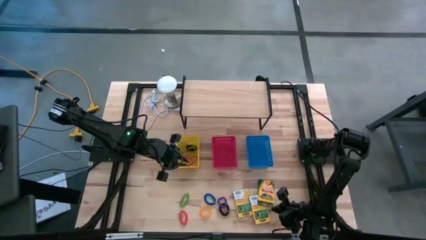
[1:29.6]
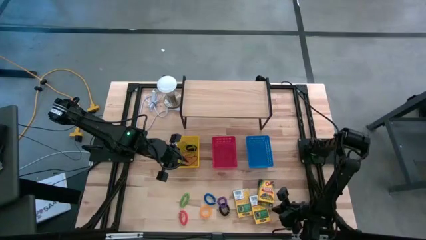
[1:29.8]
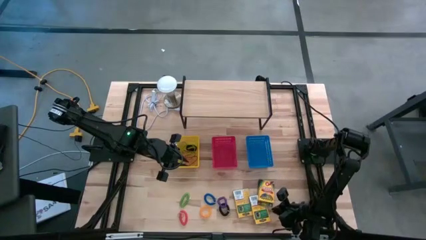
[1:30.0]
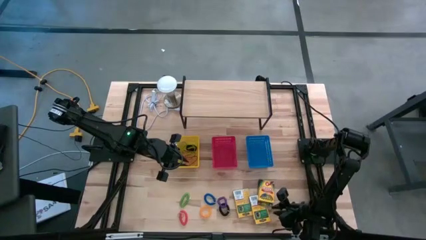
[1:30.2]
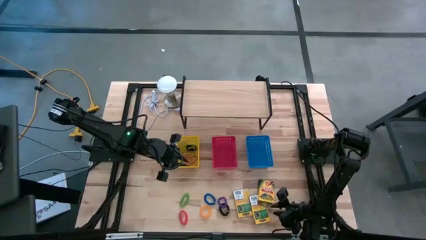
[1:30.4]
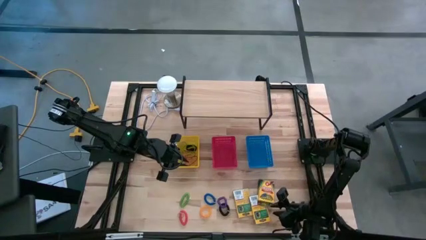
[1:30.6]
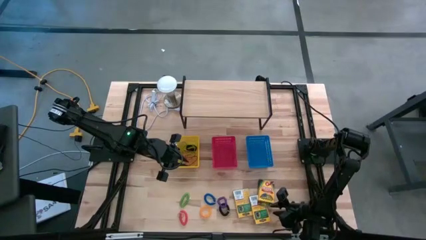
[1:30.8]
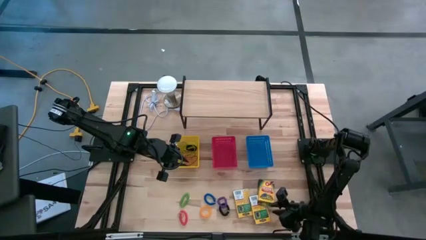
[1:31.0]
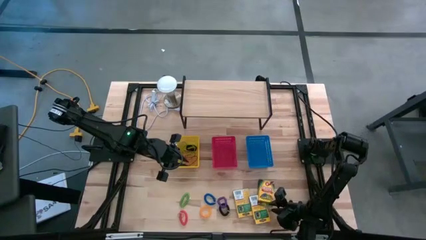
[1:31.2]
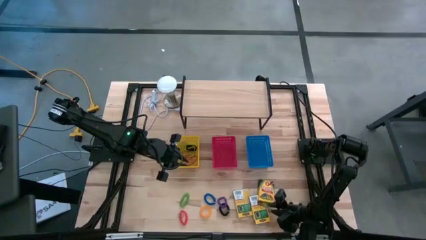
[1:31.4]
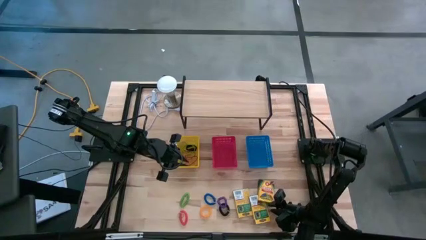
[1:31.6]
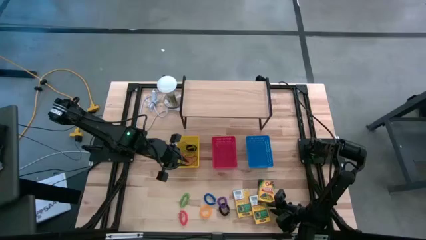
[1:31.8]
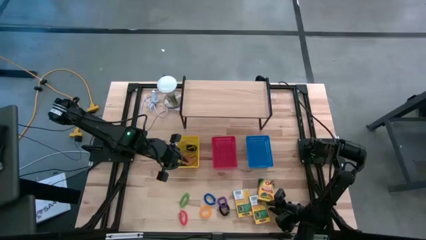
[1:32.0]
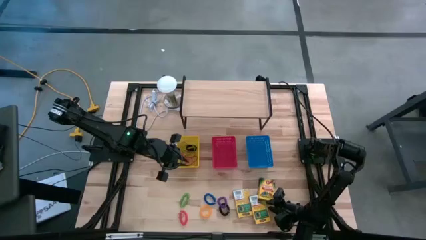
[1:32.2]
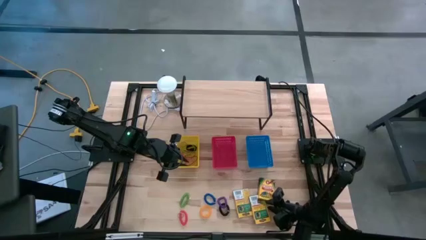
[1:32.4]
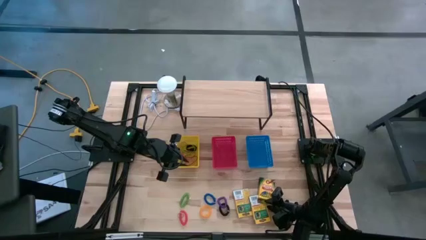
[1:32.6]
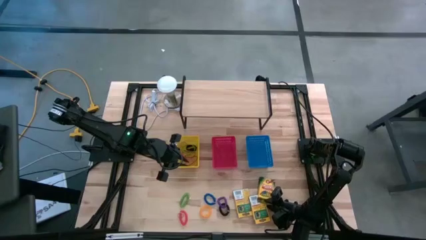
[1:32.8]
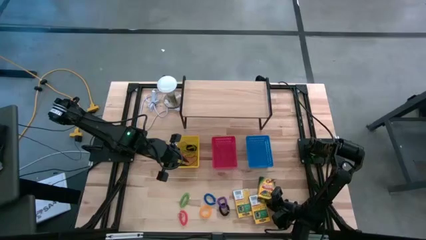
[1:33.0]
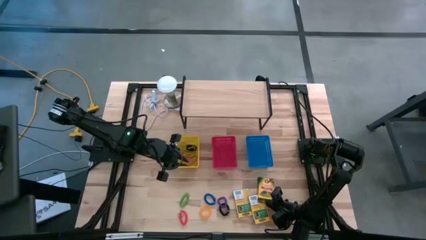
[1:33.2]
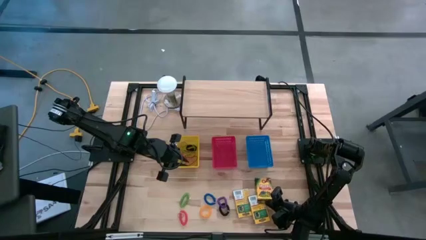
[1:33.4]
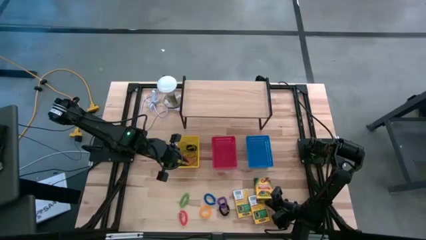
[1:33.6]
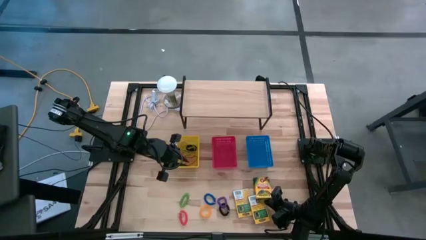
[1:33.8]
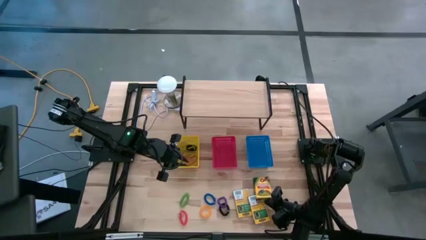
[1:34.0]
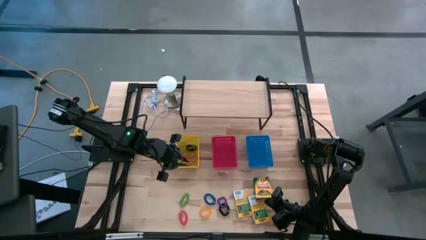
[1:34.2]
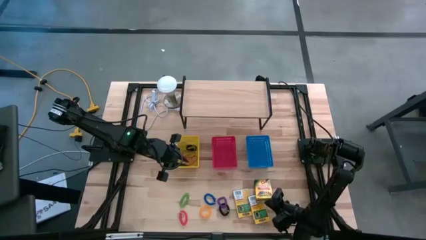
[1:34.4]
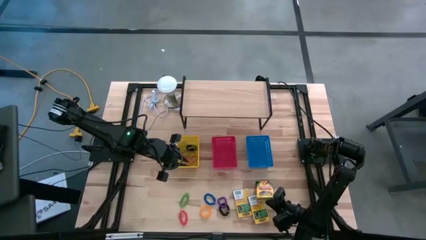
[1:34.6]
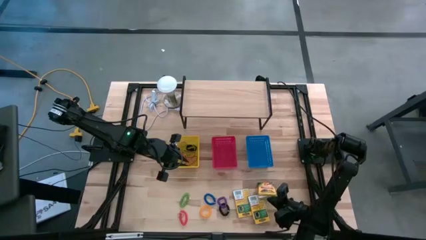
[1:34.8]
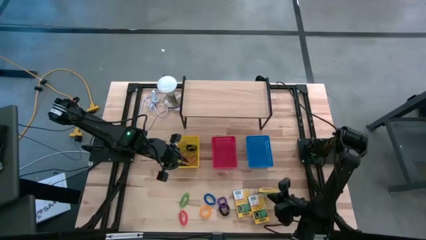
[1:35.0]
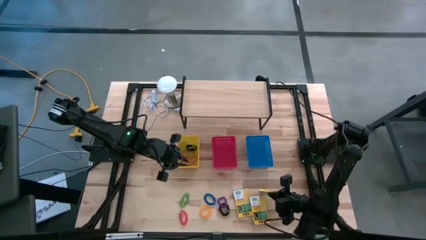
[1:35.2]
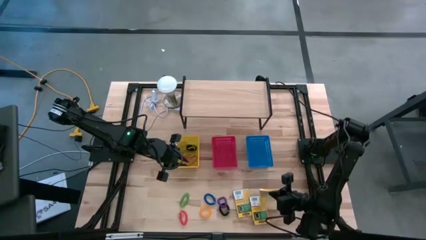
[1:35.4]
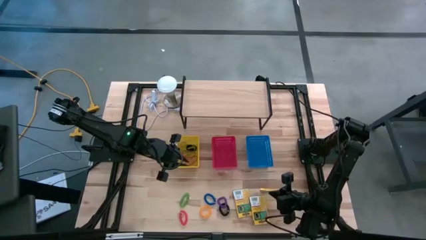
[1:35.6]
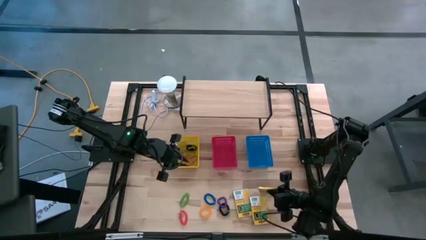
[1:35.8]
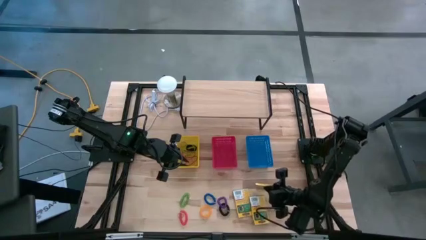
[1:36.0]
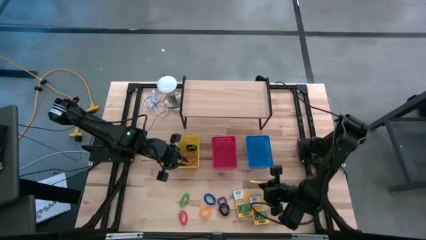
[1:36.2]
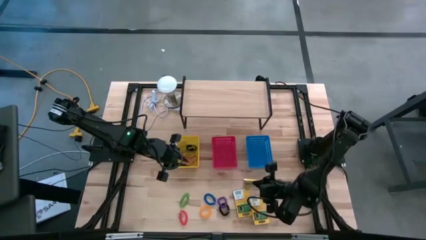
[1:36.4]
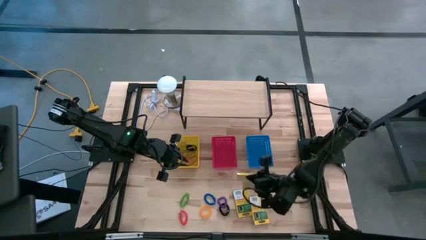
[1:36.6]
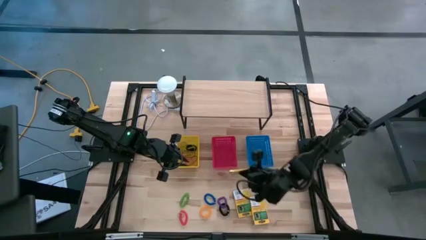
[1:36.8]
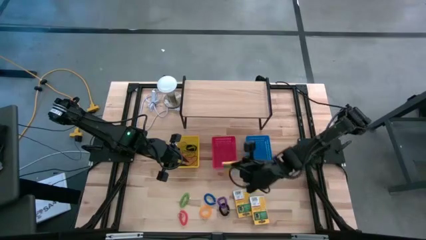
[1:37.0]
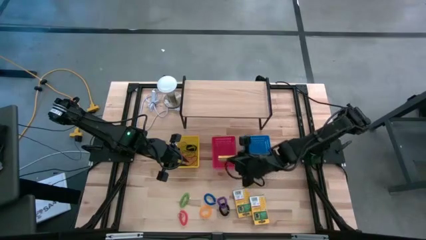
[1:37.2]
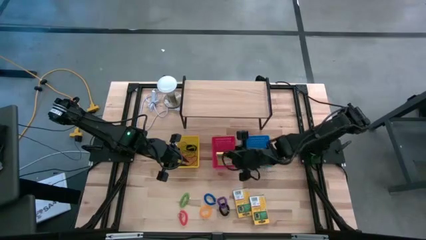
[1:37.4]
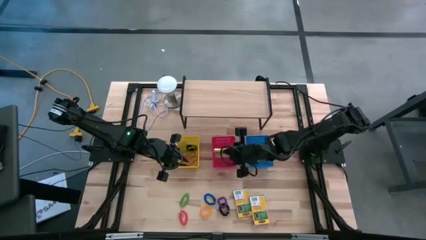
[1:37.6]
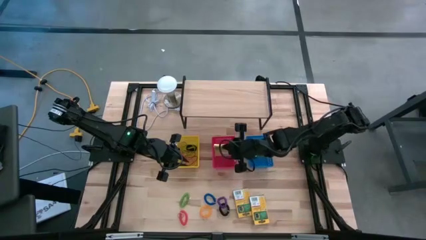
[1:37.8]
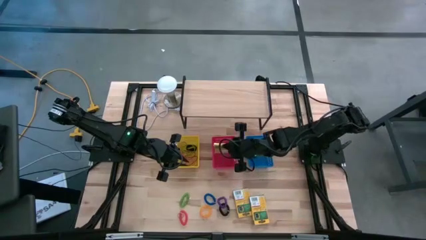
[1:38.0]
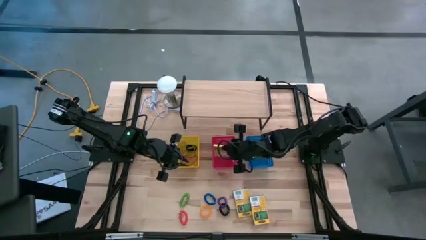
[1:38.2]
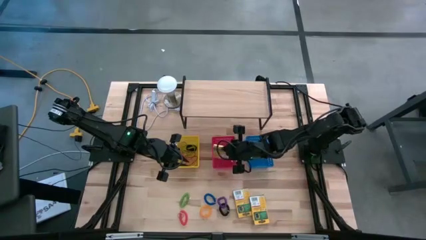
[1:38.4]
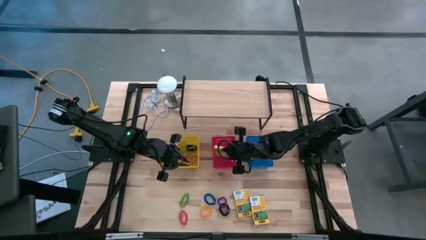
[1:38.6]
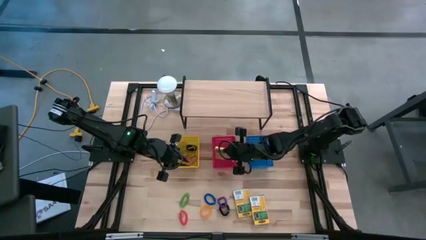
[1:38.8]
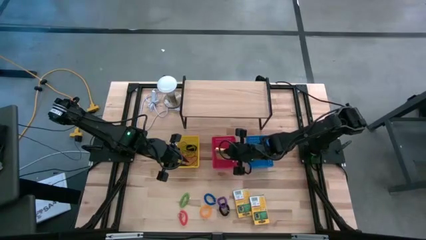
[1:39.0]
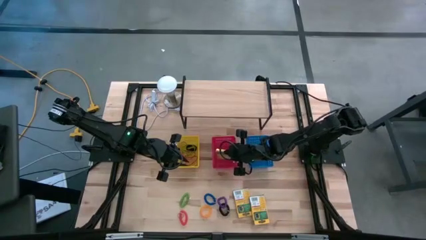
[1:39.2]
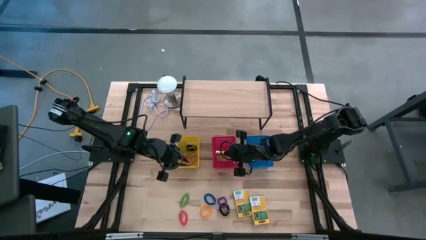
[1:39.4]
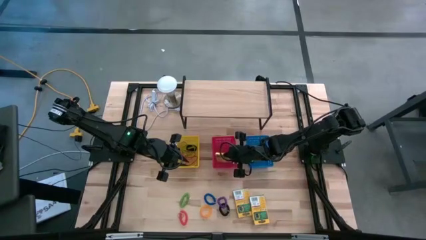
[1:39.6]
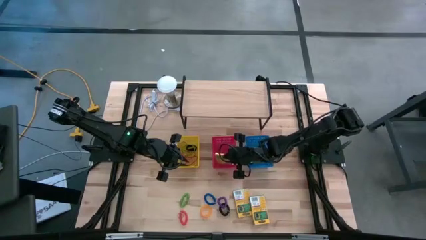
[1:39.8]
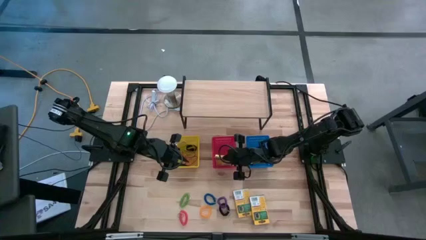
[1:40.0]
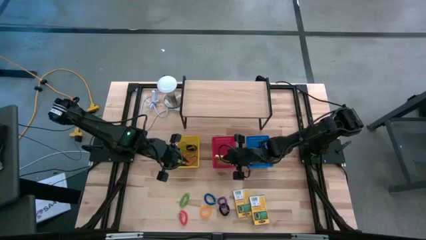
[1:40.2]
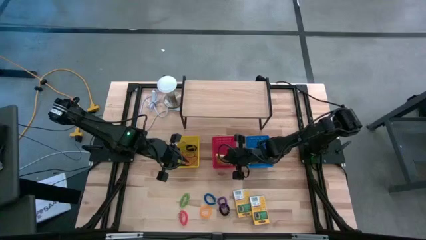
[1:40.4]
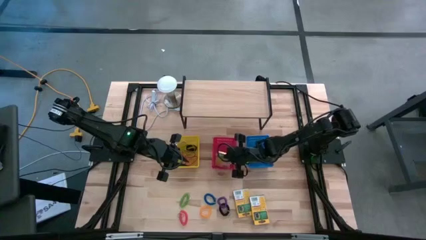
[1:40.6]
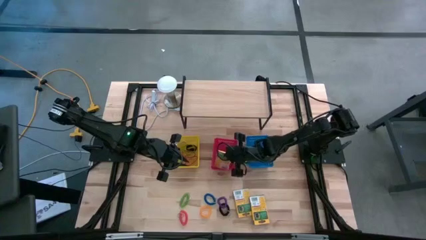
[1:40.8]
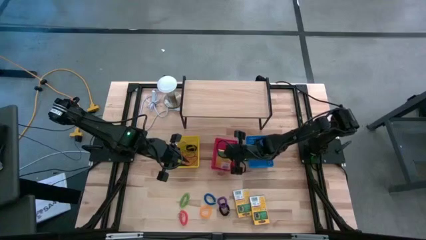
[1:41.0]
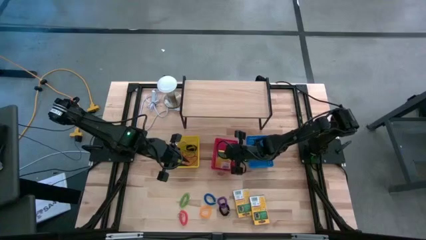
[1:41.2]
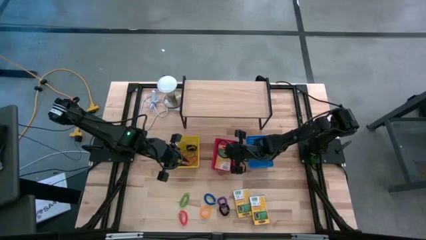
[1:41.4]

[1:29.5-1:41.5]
Task: Pick & Place Office Desk Supplies
Put the yellow crayola box into the red bin
